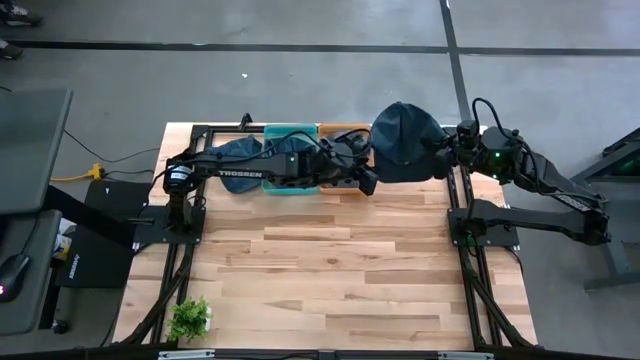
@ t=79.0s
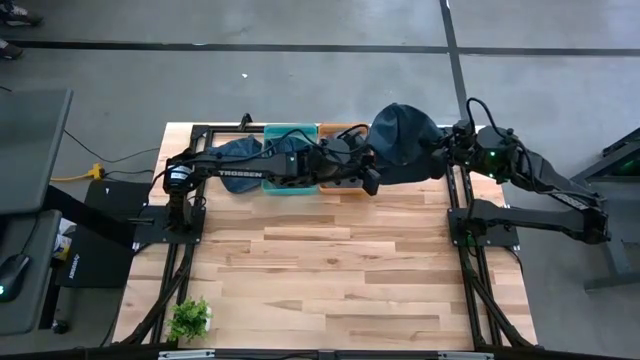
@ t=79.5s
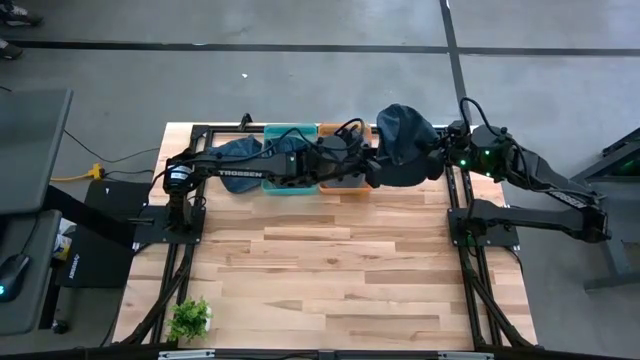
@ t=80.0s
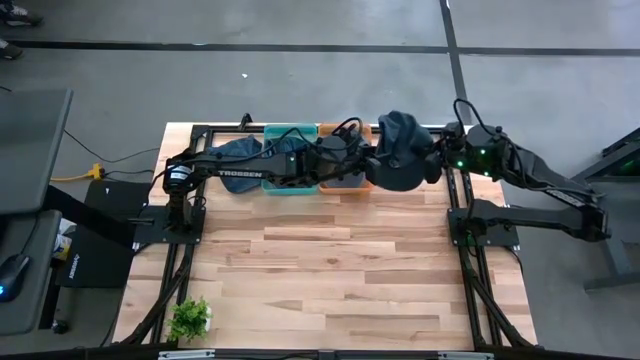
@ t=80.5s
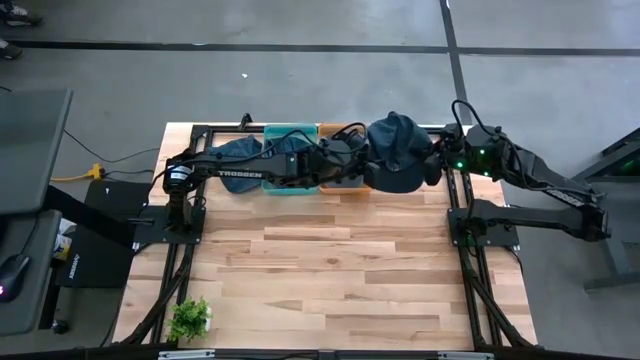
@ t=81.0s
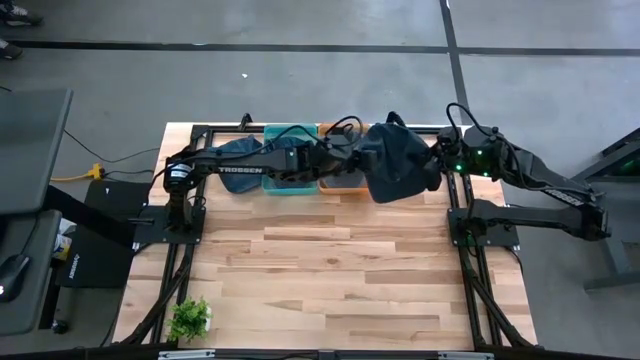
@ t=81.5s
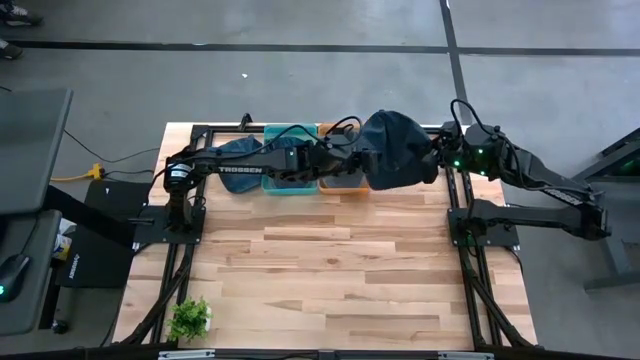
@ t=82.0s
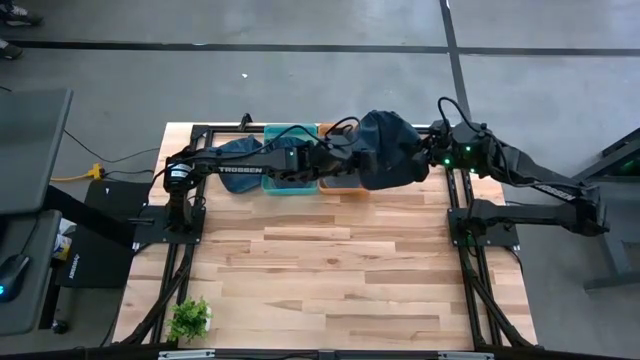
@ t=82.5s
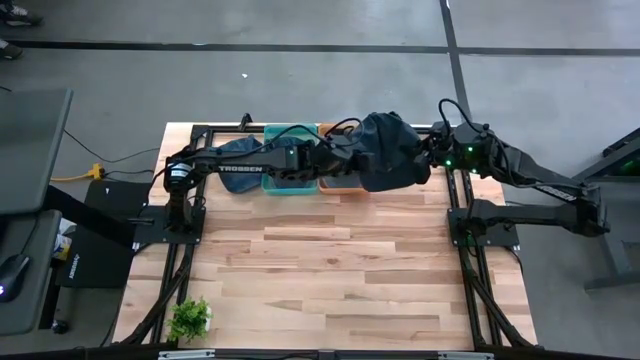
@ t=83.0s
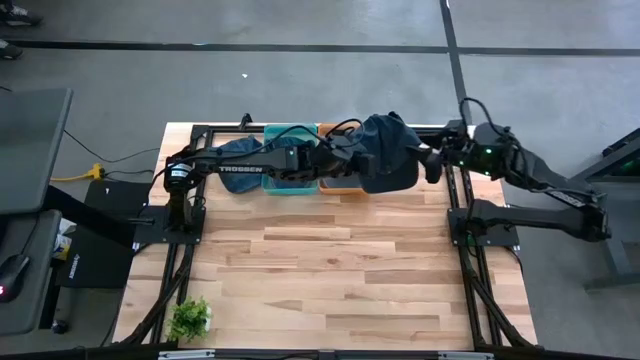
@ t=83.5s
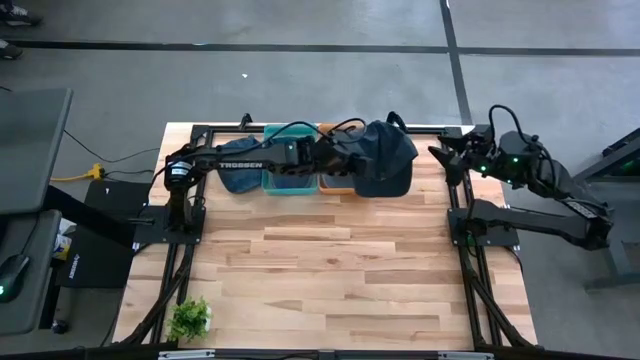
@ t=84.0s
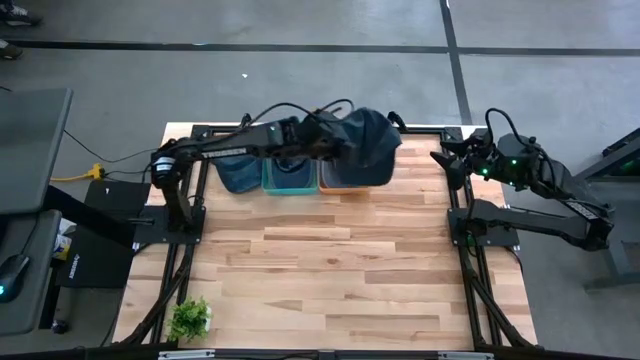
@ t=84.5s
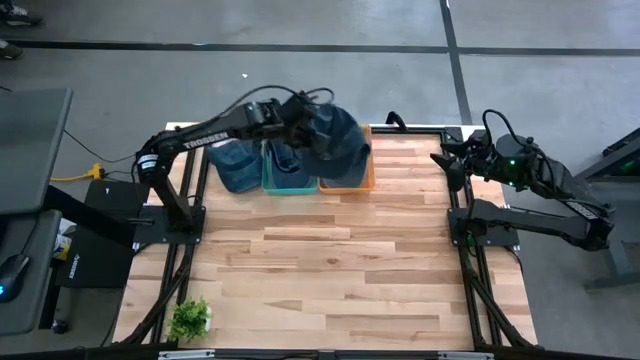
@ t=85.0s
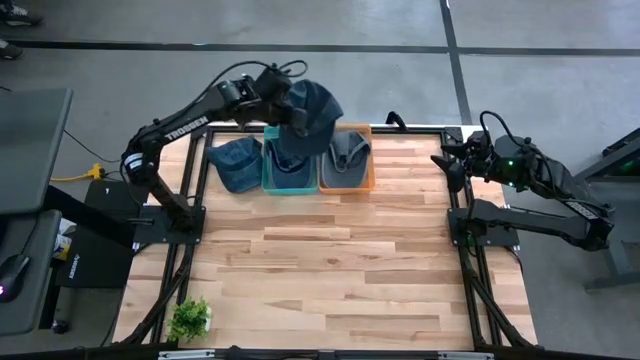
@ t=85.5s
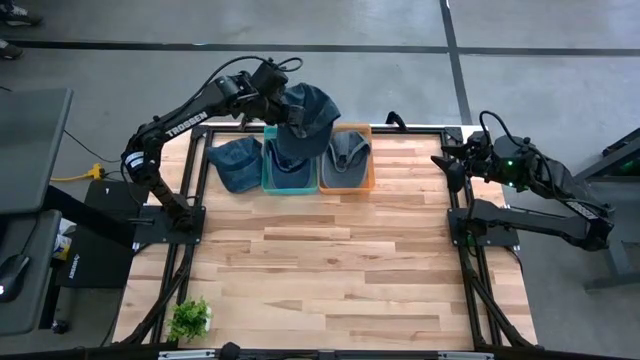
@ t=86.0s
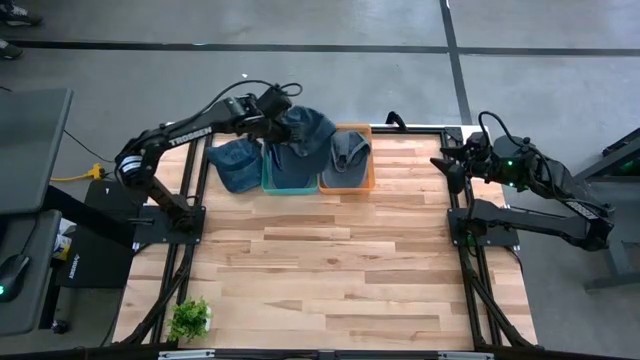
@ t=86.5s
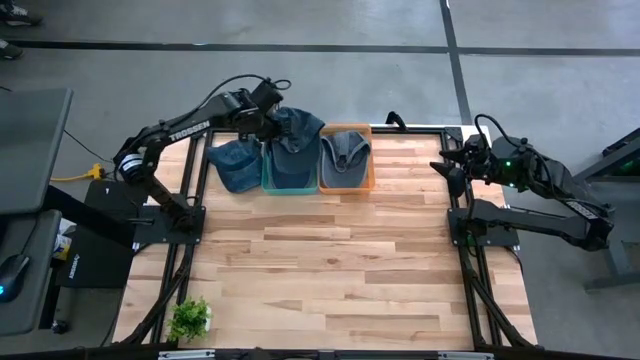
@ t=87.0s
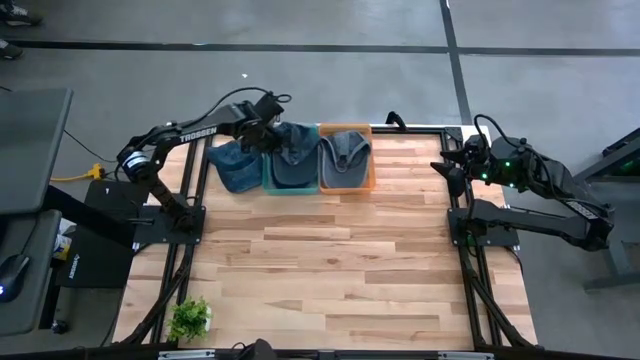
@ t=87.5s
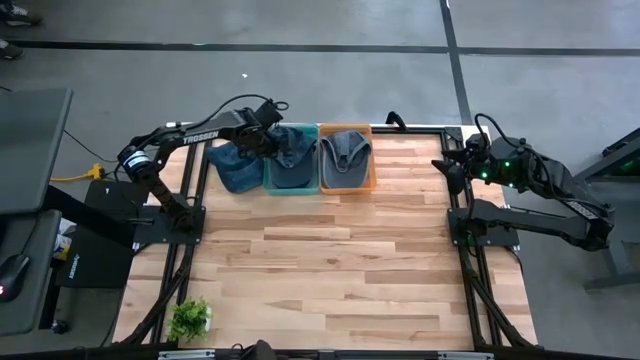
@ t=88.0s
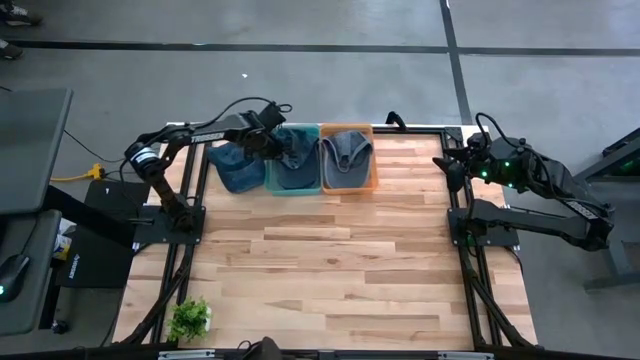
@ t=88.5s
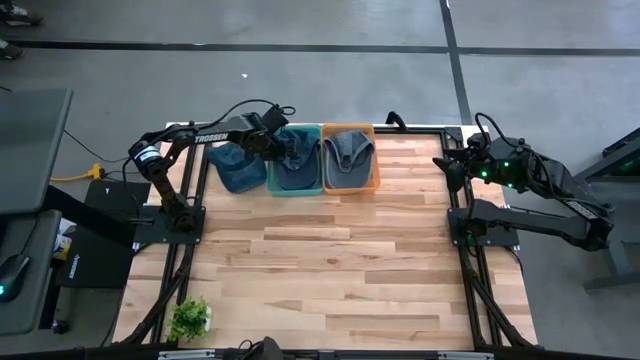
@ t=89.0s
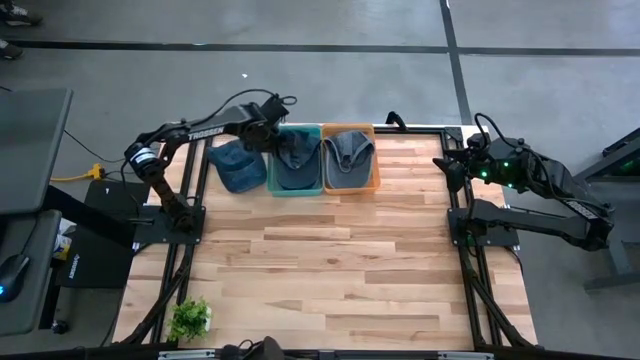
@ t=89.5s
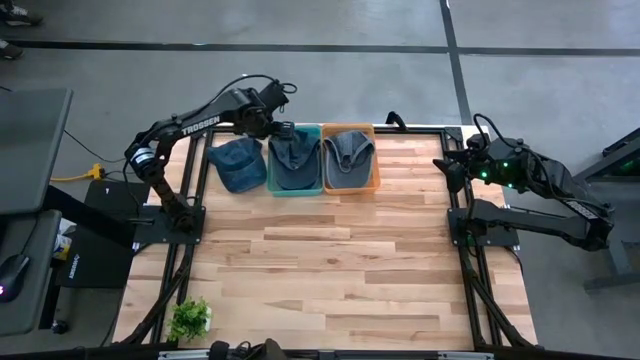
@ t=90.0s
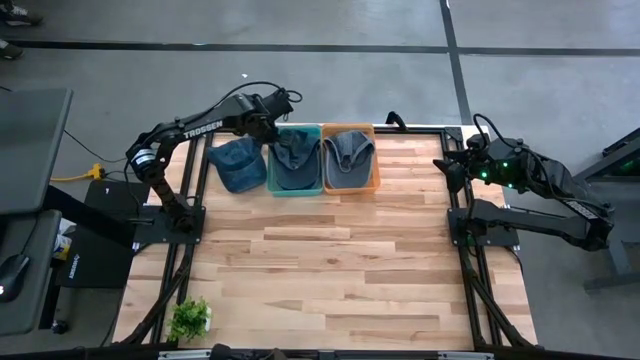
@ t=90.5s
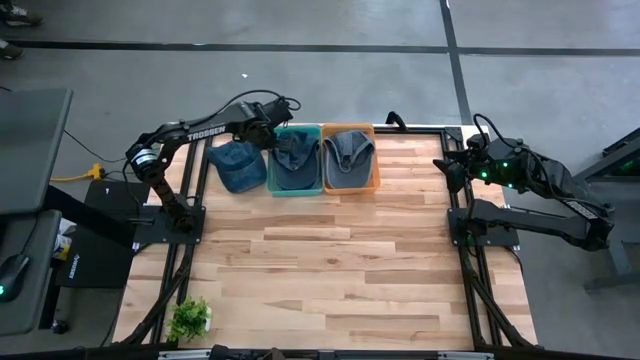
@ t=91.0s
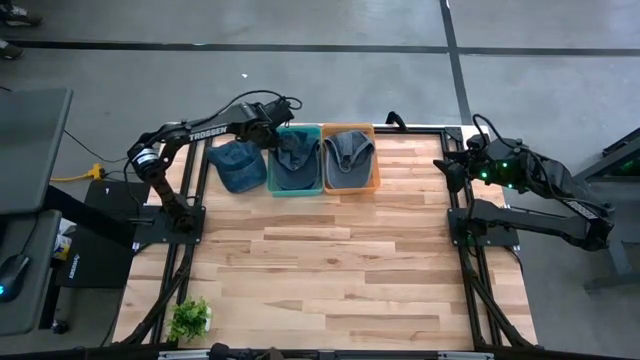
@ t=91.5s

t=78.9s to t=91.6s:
Task: Pick & Place hat
Put the bottom blue cap into the green bin
